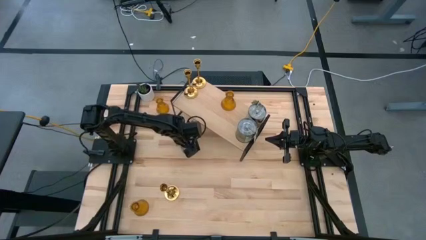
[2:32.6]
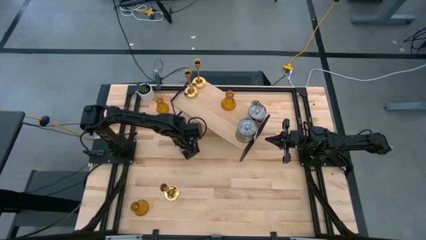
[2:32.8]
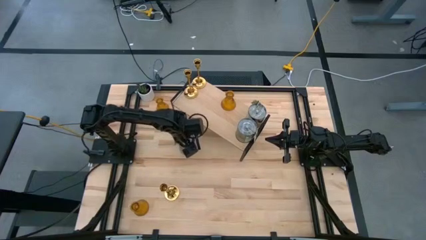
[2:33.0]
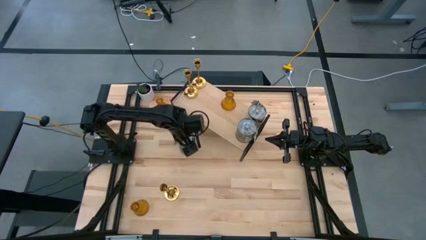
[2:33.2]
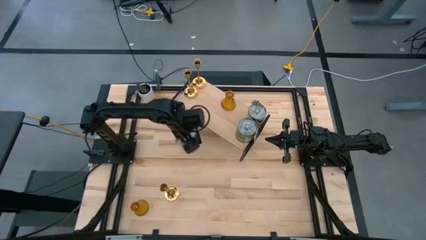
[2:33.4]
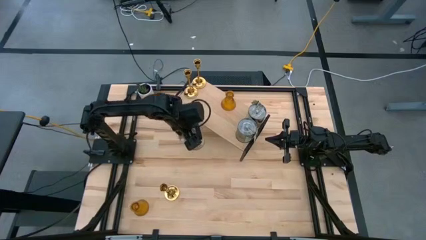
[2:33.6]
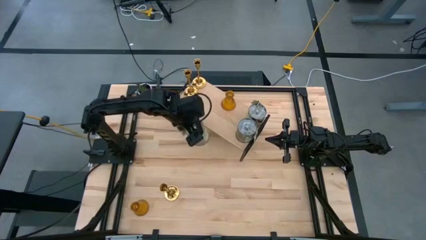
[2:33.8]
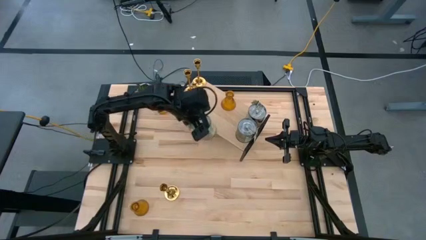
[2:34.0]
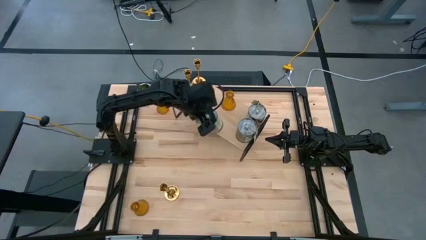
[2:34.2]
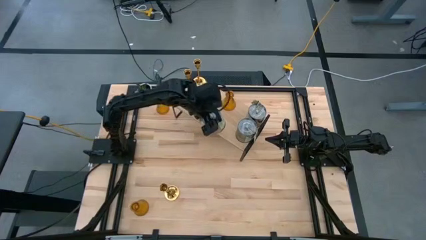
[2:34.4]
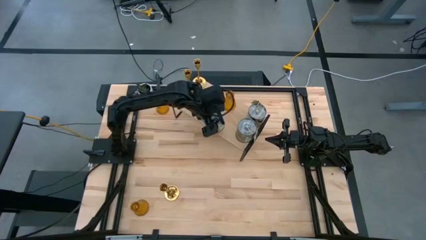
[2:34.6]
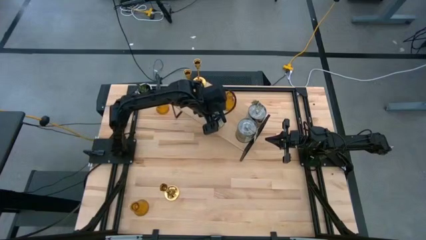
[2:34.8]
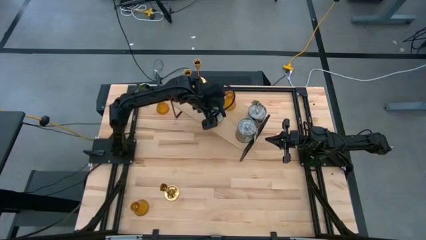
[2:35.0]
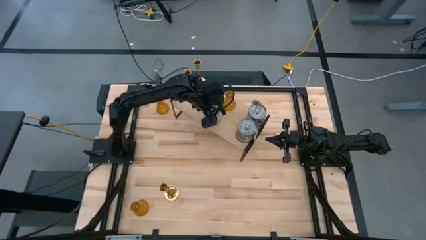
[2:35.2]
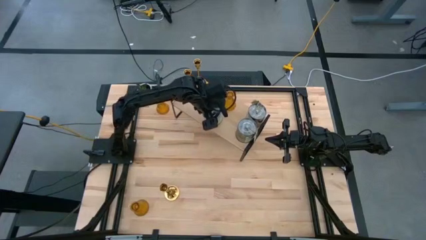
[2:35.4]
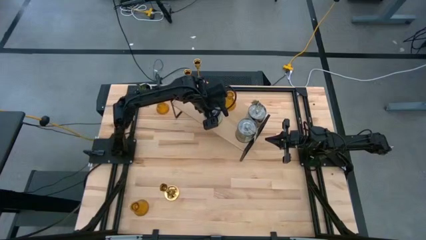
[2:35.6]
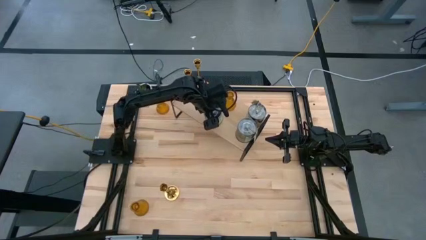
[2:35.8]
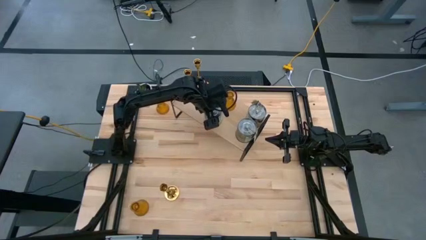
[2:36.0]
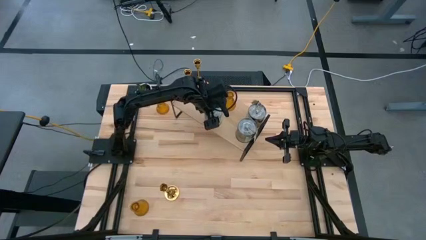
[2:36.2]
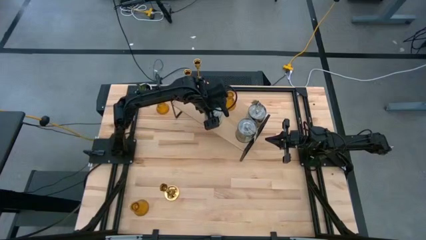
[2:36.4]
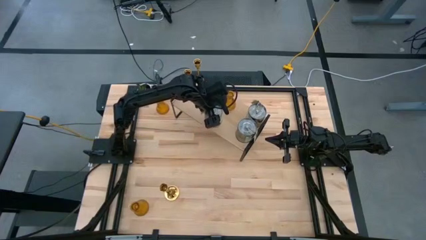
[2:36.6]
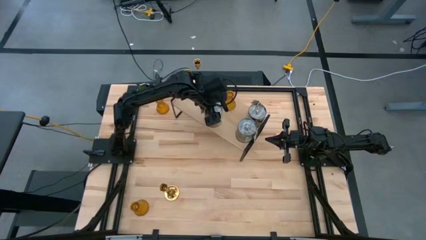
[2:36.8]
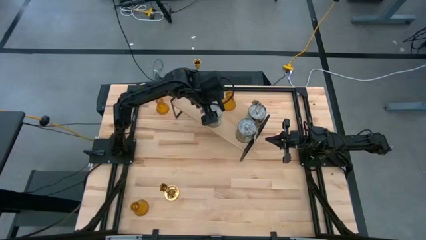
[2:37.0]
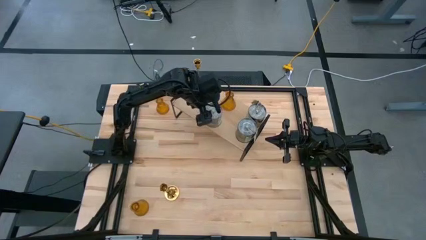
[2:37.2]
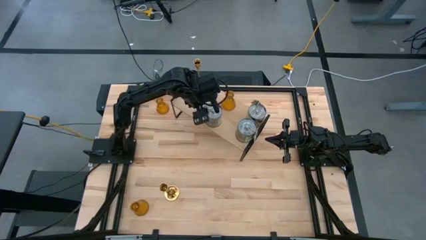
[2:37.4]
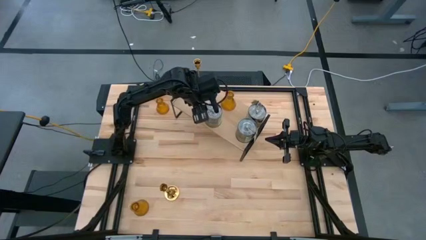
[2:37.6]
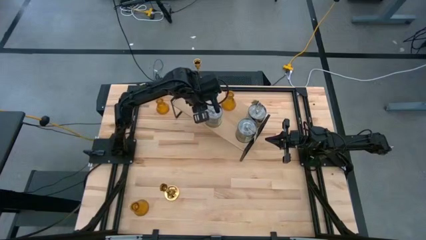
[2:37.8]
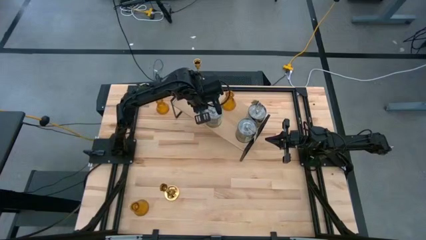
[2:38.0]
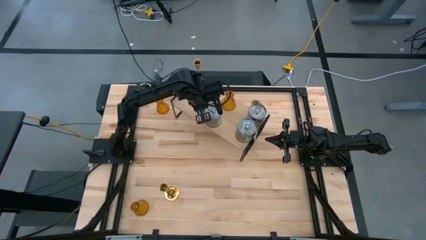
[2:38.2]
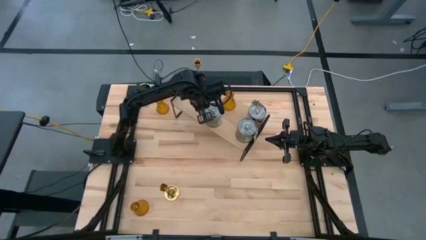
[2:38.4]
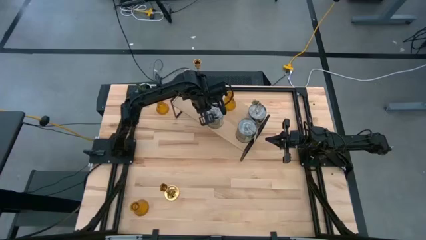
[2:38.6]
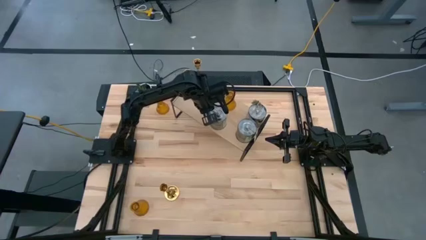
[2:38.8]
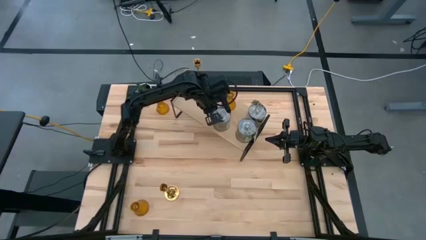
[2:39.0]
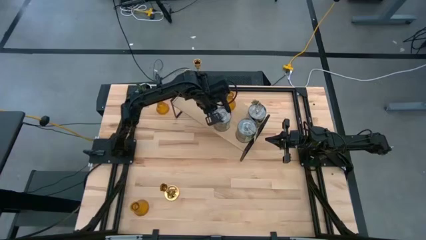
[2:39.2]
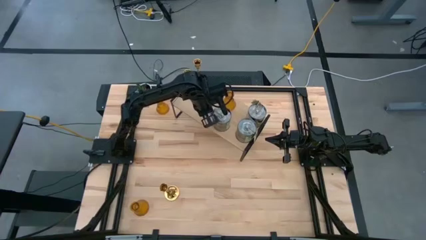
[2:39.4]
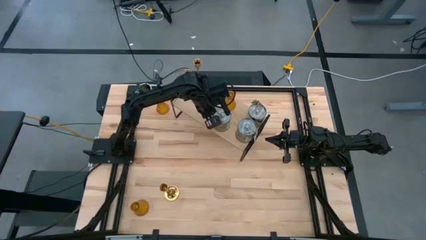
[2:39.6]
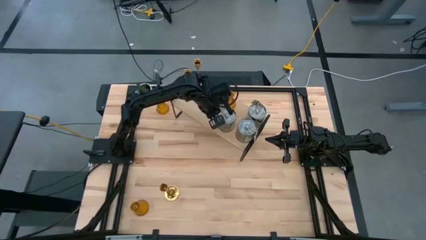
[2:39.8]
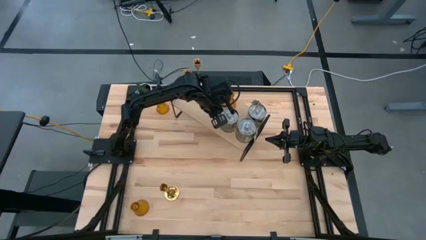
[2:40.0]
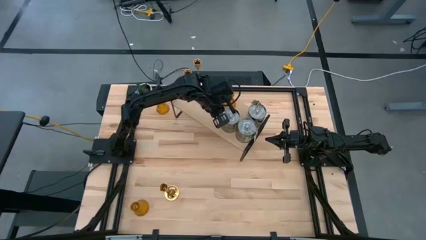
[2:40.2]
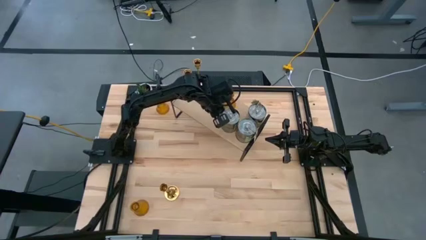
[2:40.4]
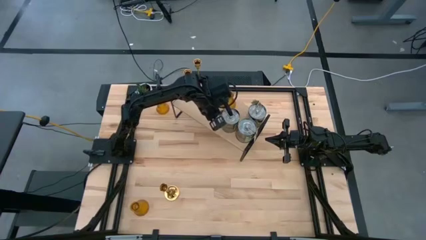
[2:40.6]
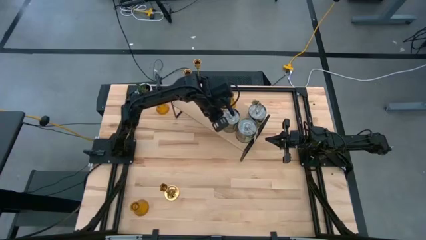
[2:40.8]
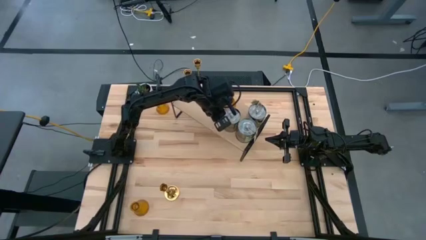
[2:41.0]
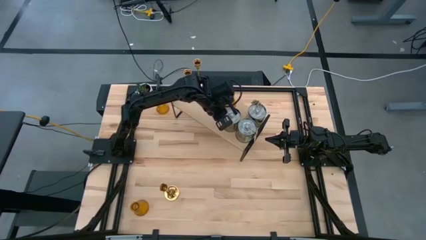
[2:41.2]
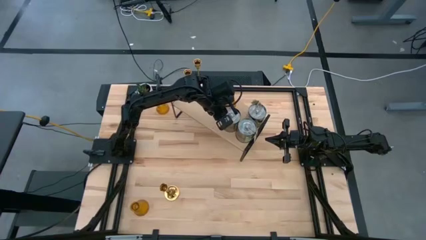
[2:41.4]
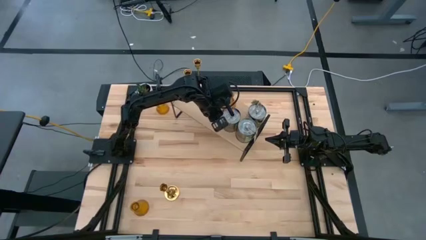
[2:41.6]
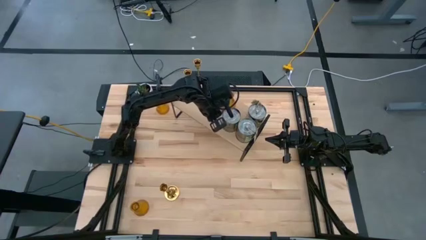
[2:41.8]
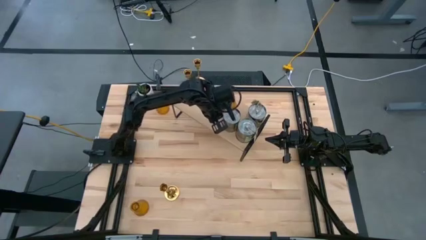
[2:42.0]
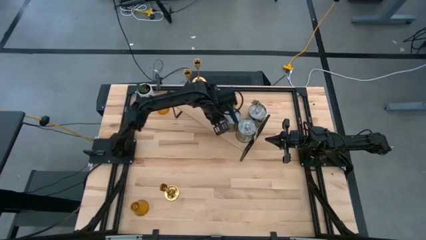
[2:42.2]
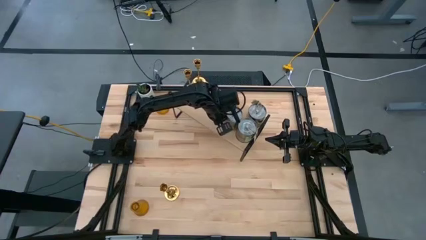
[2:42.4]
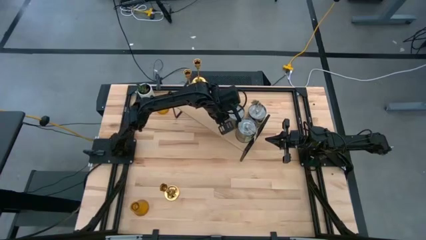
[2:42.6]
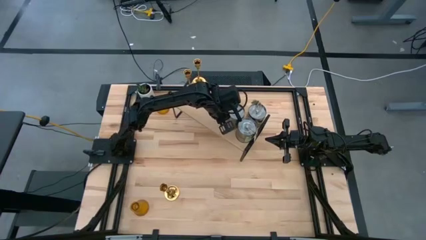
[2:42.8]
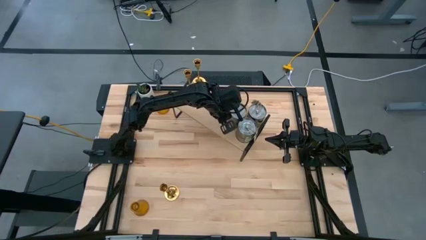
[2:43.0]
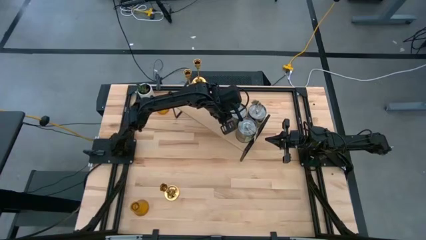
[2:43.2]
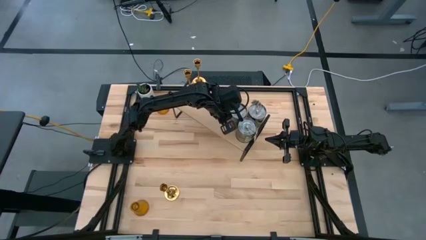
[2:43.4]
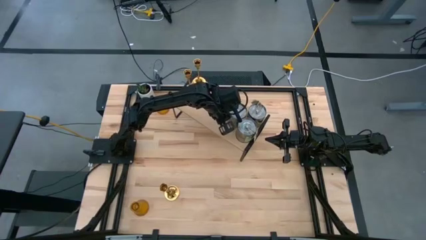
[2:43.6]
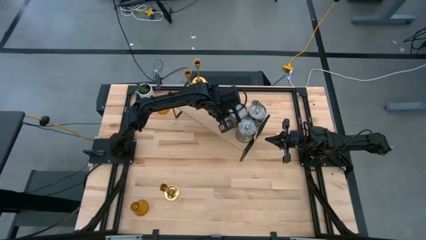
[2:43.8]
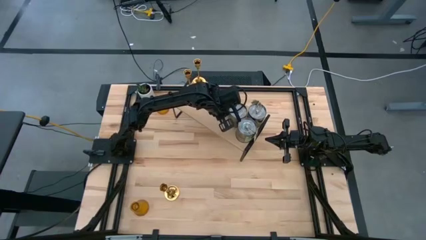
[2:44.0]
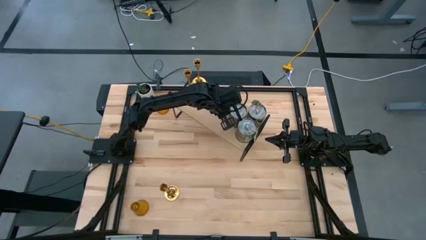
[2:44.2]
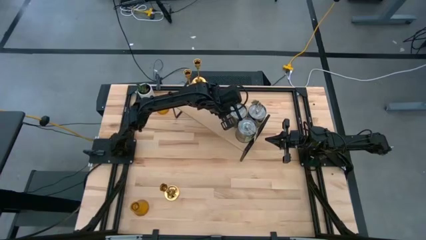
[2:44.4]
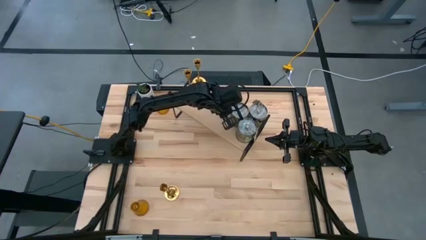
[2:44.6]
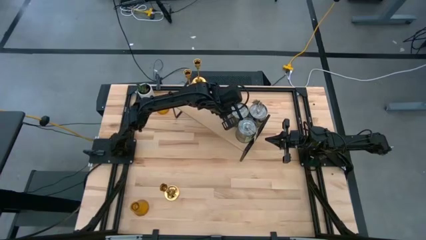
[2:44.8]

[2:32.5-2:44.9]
Task: Pick & Place candle stick holders
Put the scented candle on the shelf
